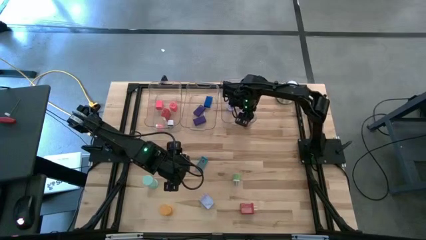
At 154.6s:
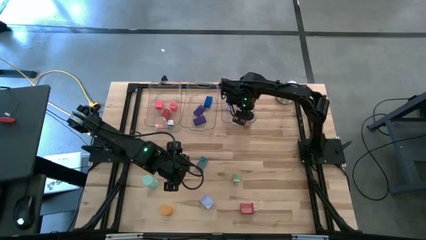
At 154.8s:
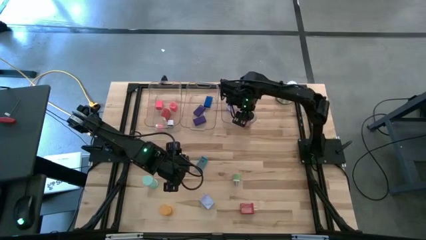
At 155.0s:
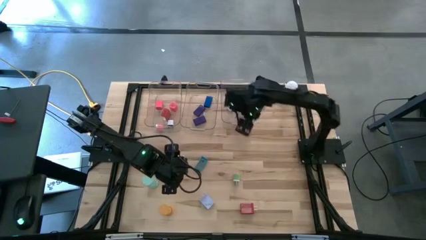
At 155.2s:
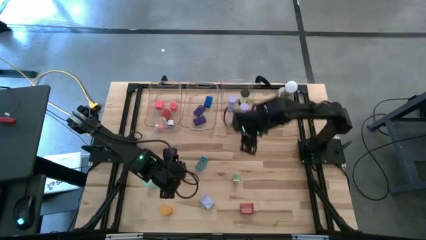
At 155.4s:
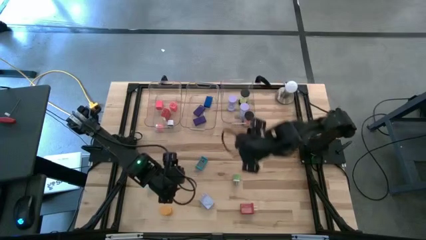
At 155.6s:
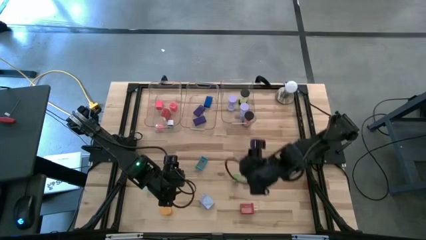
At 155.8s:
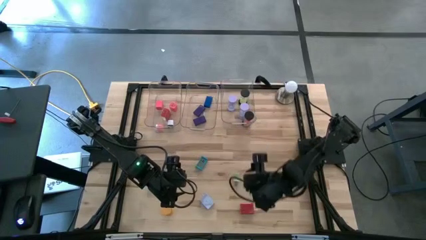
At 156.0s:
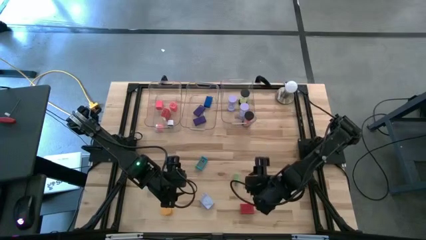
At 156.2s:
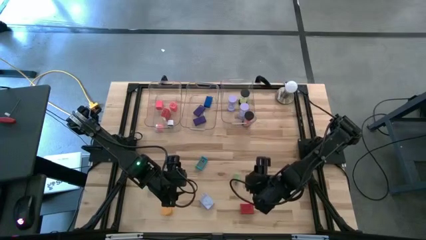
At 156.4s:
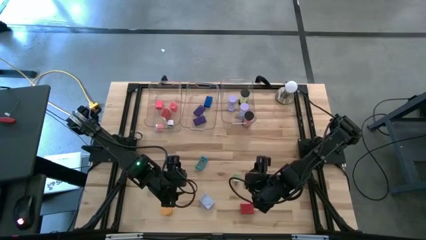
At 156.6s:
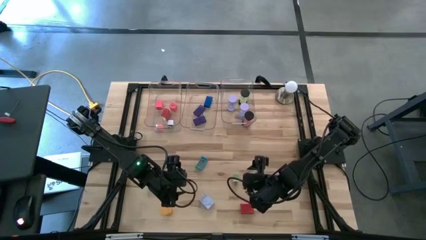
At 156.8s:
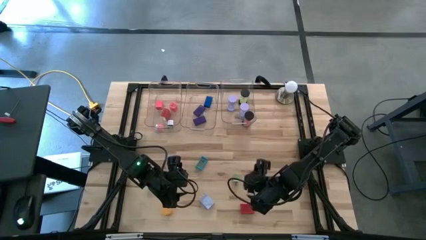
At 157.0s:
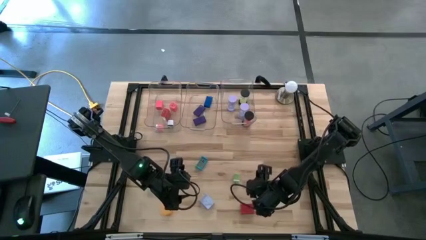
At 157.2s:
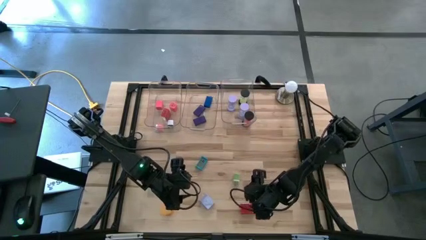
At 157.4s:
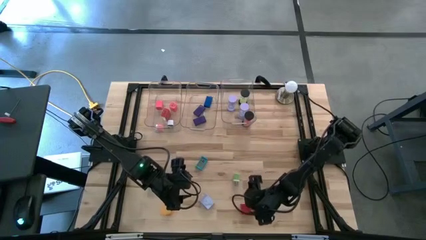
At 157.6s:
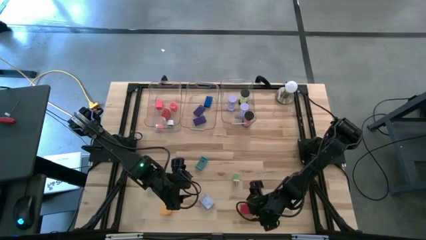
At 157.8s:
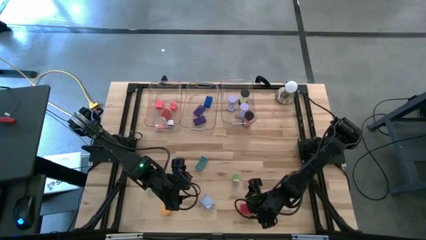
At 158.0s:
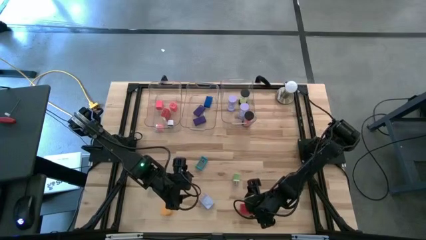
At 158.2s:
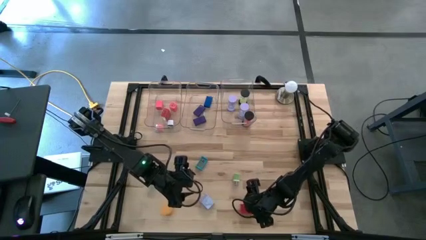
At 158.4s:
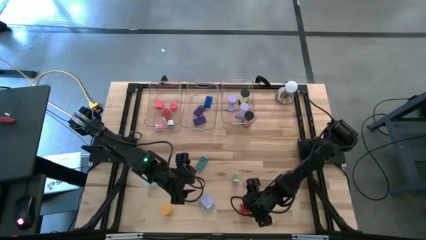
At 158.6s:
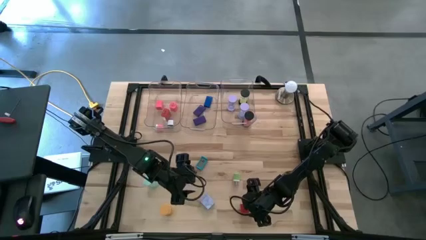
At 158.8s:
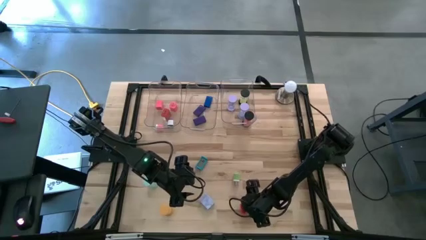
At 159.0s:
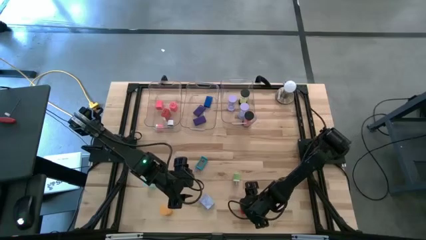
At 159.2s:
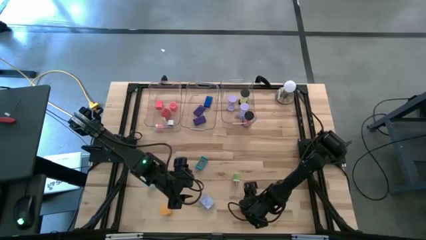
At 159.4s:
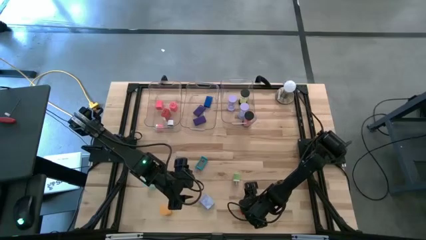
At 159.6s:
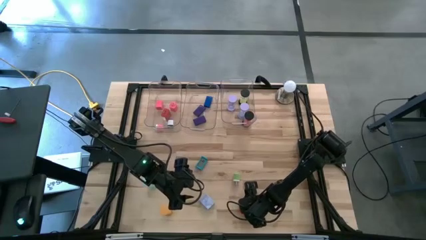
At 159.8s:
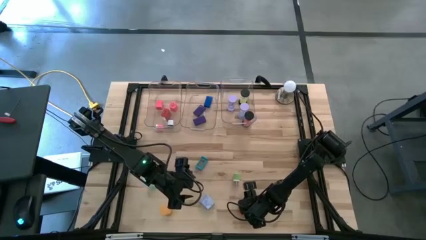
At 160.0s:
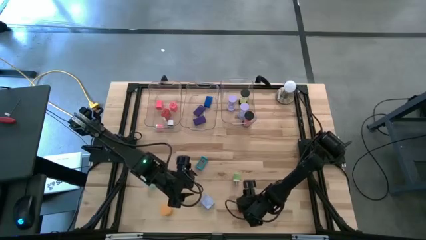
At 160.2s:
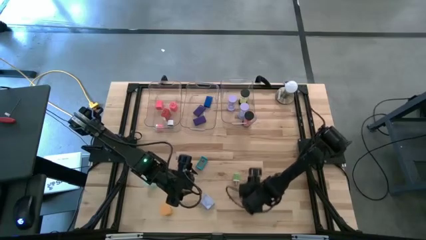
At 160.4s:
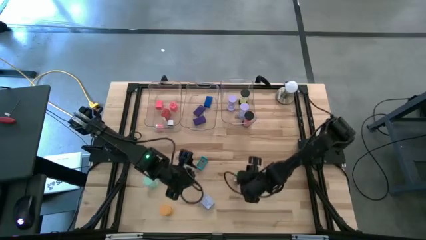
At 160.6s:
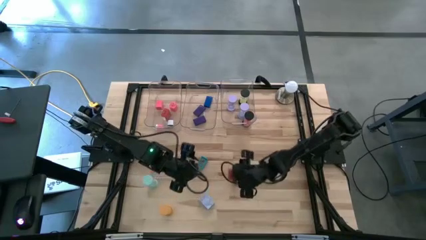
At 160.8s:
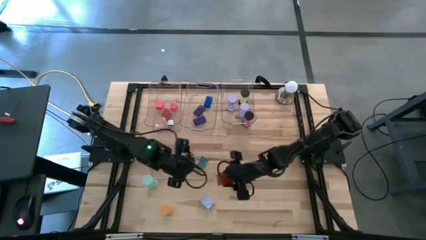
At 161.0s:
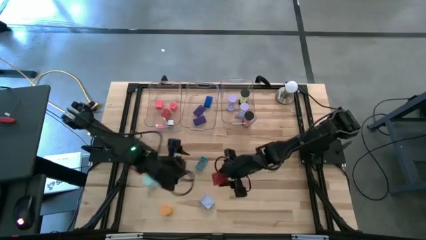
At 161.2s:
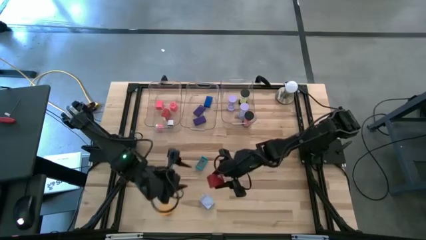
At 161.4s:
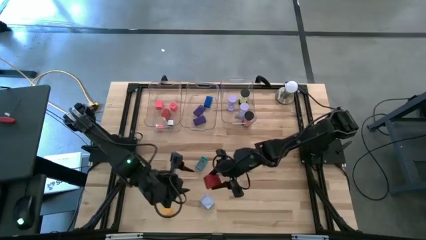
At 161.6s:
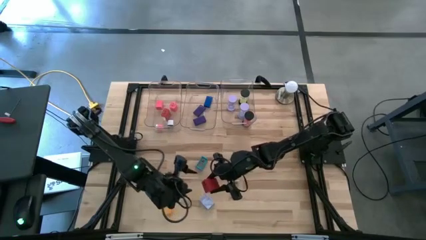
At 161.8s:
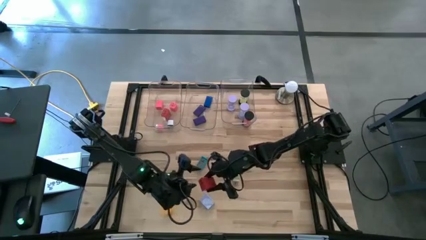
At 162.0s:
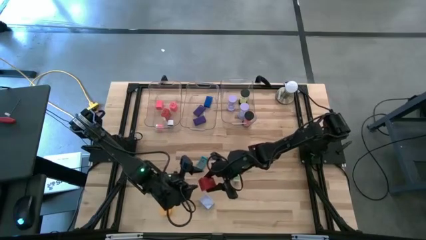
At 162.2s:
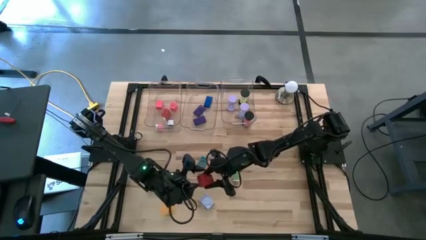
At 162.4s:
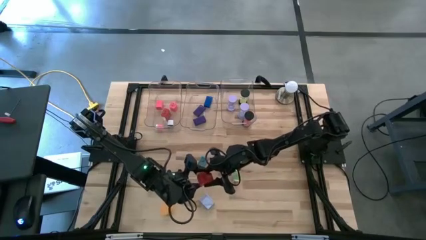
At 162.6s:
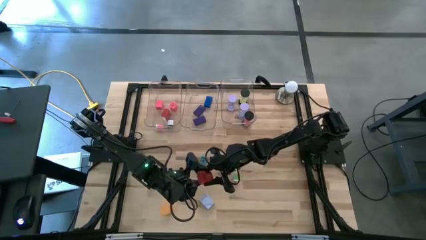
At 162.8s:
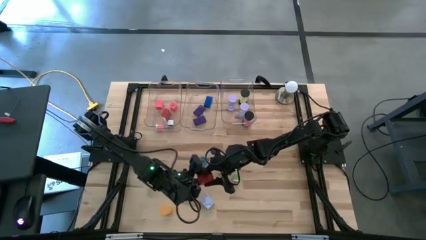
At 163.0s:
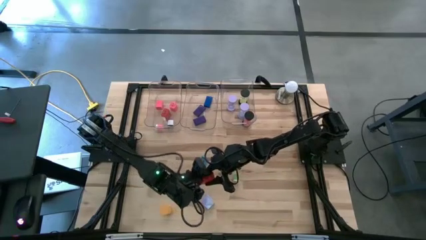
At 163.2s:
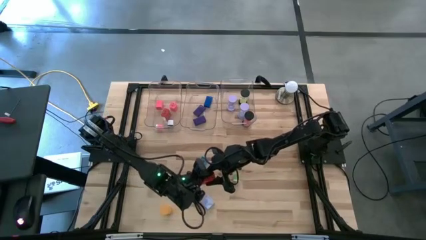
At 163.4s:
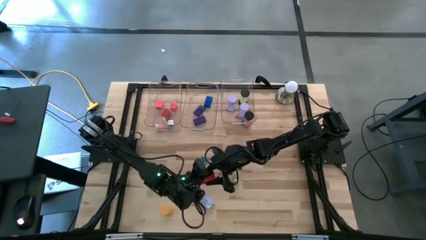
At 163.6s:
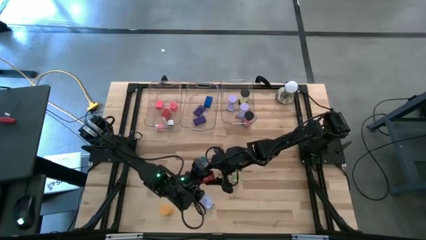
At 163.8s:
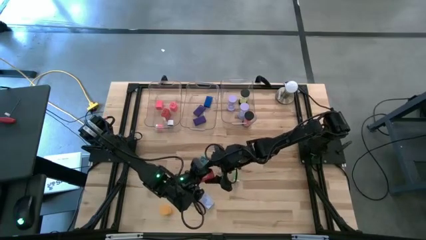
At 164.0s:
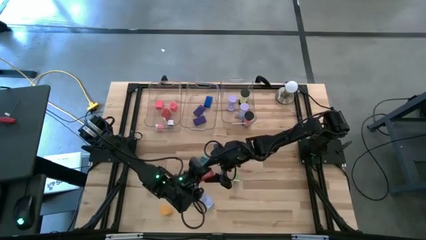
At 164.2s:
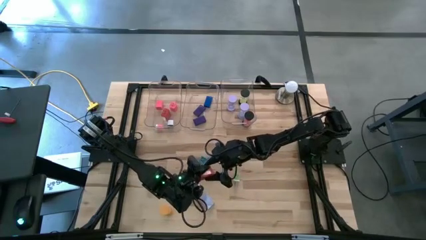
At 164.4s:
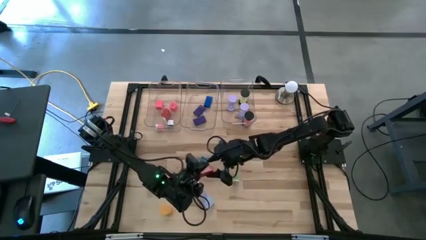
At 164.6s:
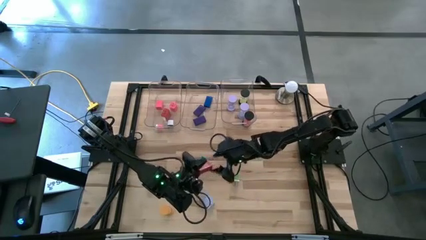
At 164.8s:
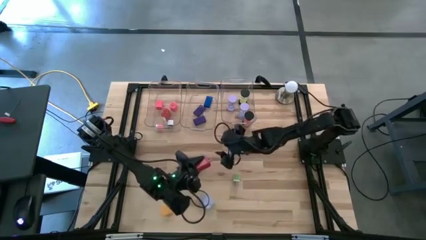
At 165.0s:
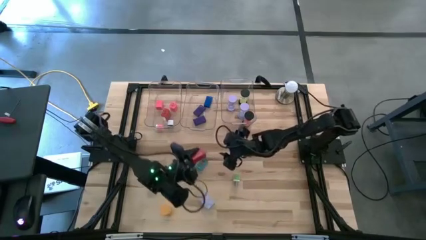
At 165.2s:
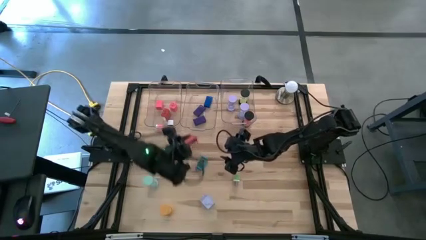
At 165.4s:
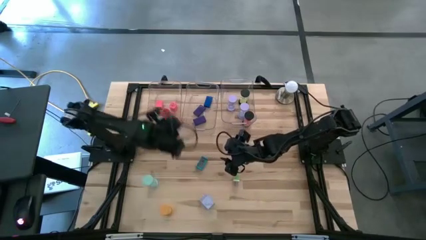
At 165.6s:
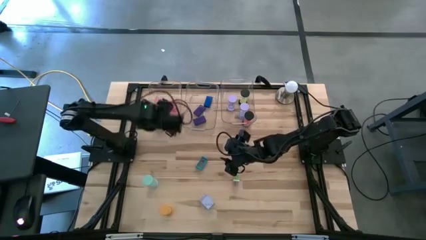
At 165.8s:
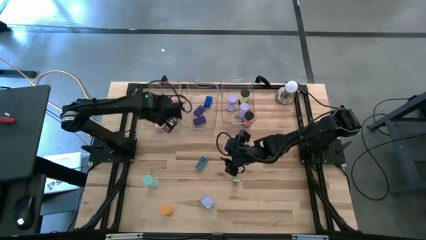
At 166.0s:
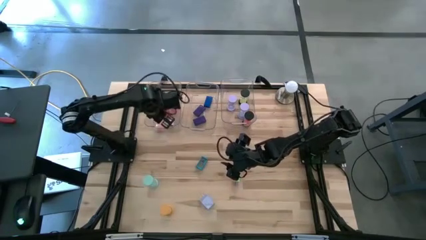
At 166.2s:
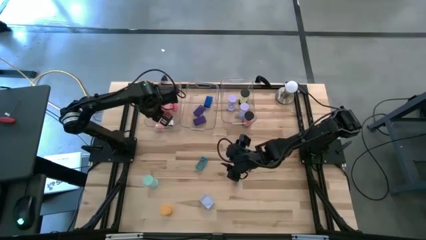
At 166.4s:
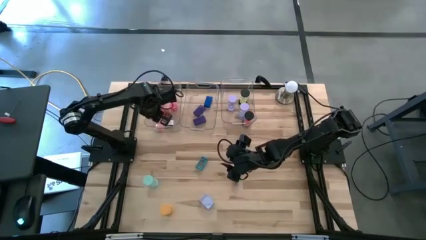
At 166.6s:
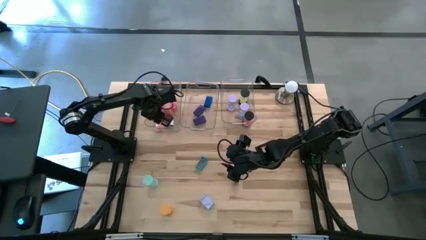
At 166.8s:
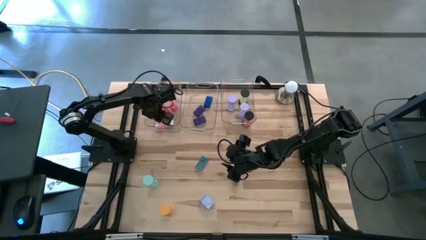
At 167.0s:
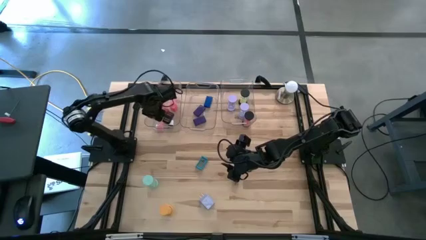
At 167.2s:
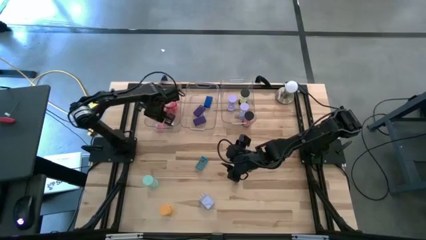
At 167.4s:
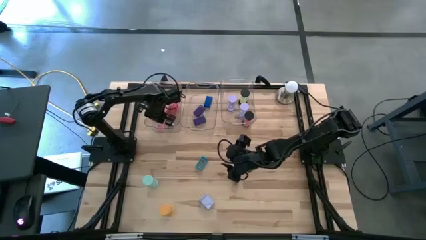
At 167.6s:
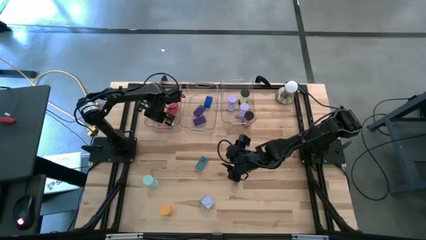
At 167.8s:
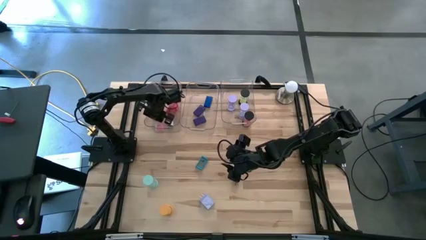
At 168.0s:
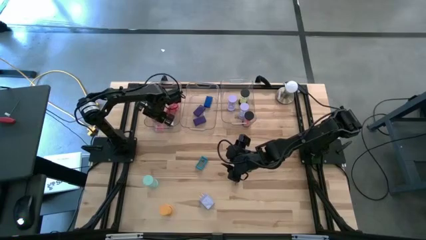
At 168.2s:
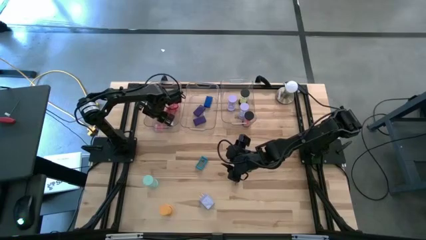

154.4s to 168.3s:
Task: Pick & Place Office items
Put the red charger adapter into the left transparent bin

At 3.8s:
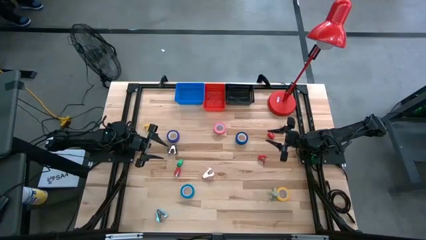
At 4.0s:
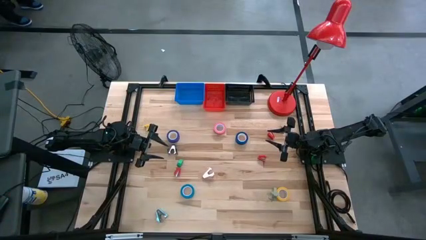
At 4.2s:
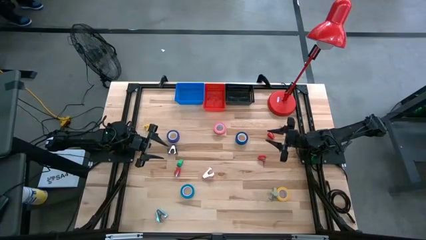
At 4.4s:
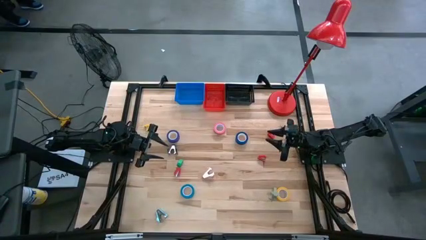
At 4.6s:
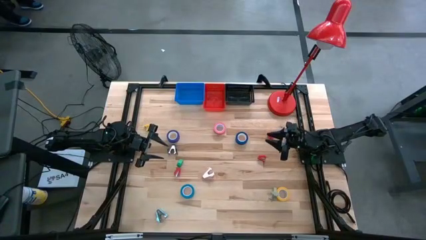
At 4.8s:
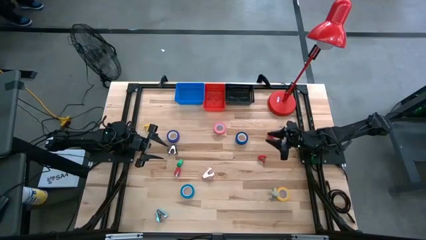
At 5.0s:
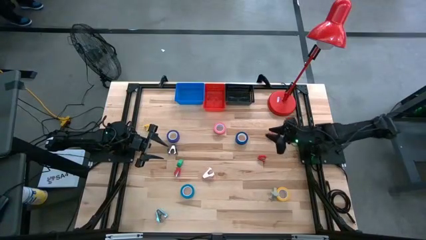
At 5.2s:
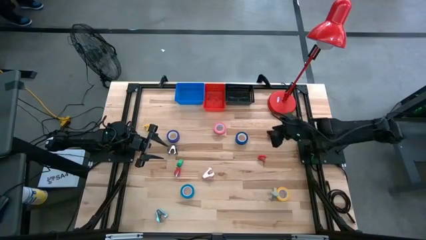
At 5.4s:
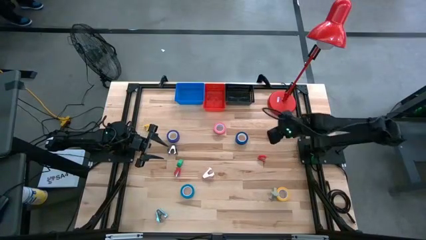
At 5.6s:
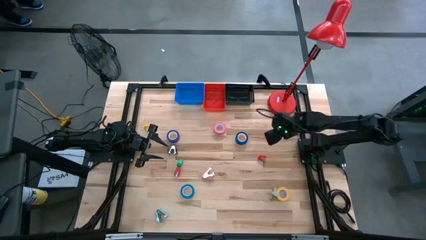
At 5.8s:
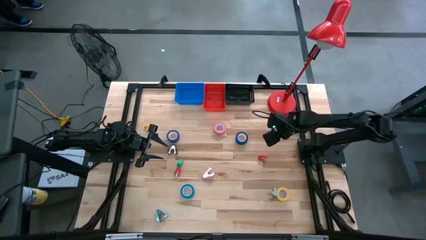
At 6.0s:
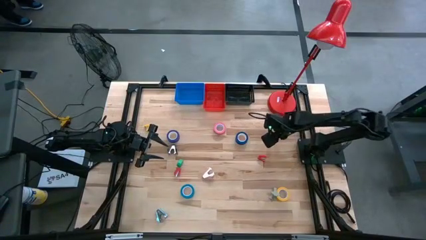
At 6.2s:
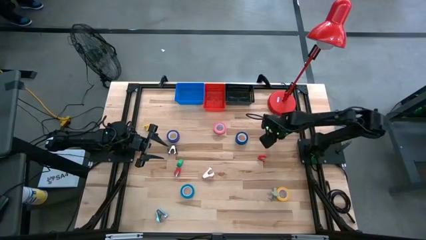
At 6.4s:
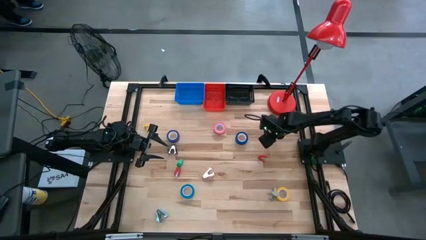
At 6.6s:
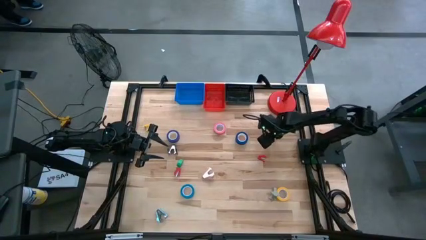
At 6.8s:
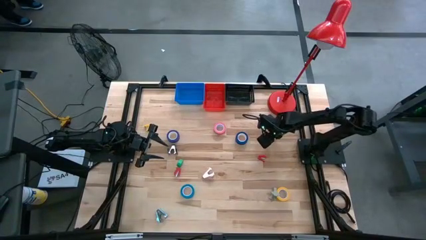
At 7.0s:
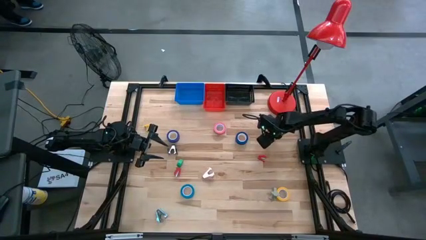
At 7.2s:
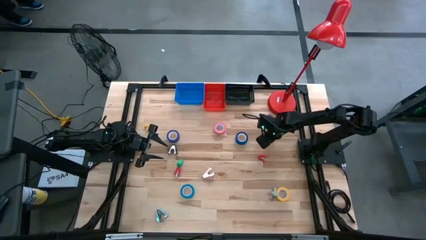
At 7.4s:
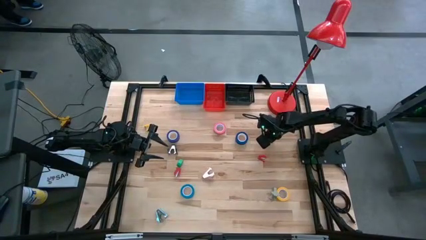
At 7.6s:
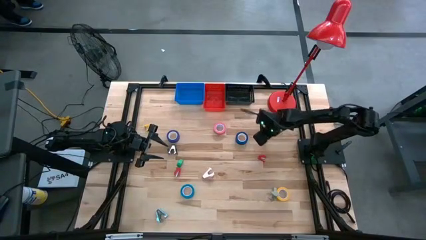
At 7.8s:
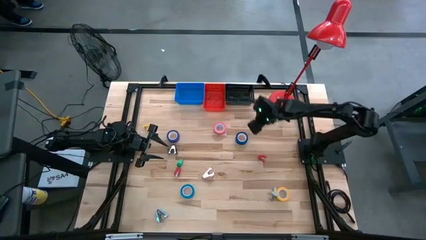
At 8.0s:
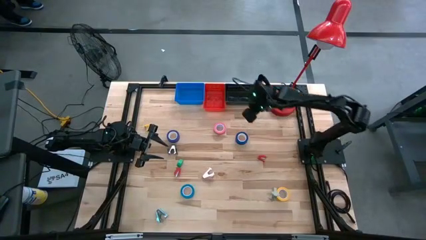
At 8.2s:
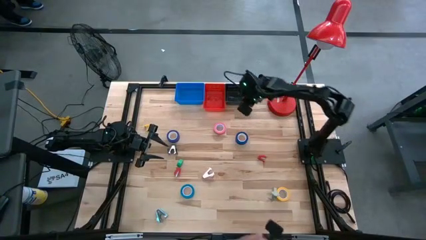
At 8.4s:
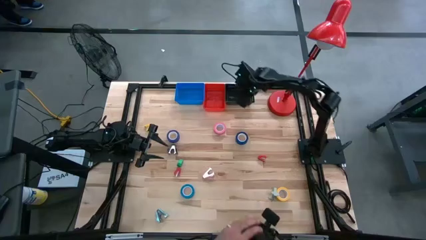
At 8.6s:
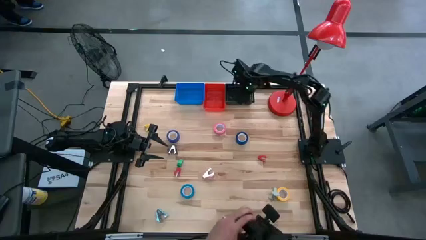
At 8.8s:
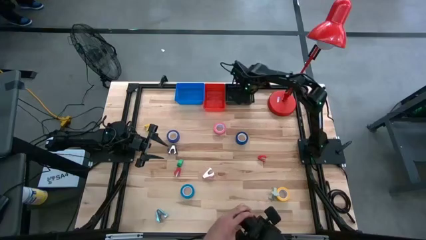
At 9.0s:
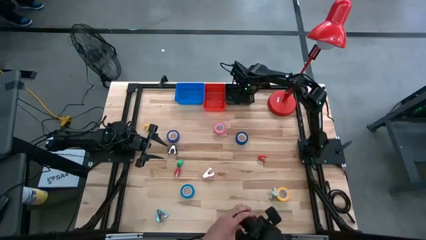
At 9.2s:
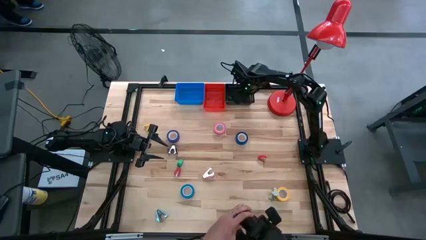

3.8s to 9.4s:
Task: Pick and place Stapler, Stapler remover, tape
Put the top right red stapler into the black basket
